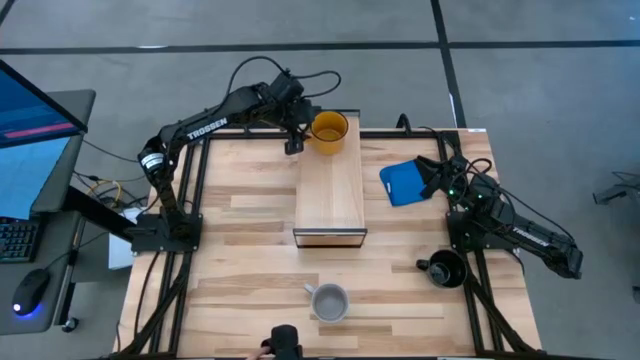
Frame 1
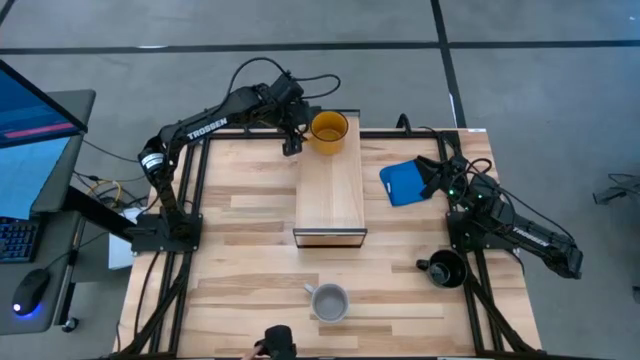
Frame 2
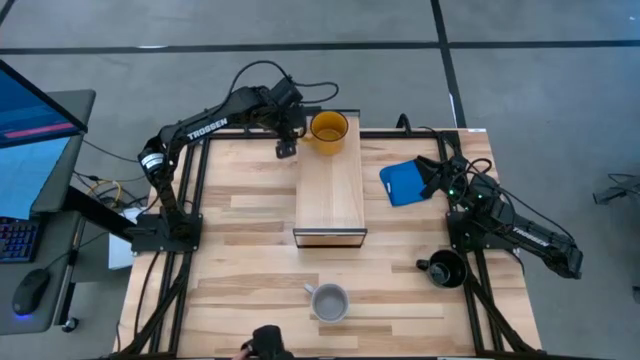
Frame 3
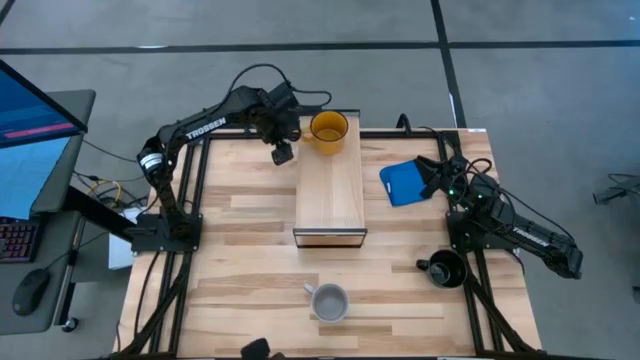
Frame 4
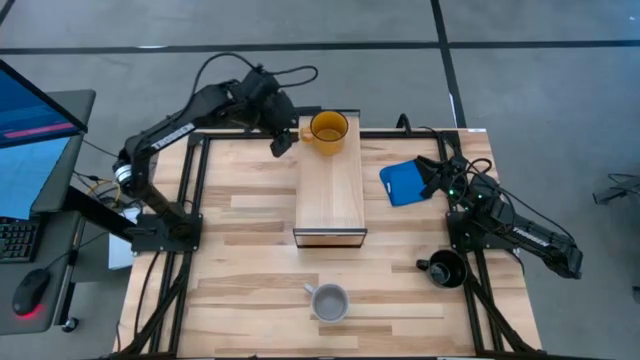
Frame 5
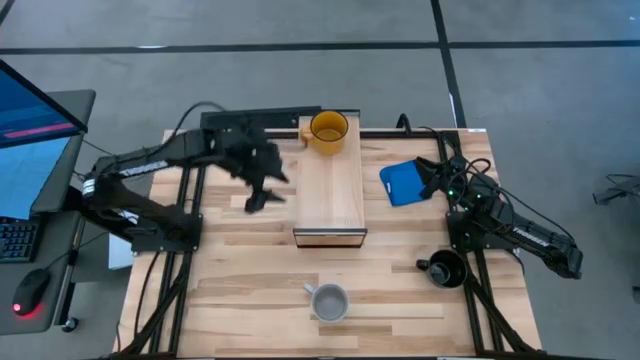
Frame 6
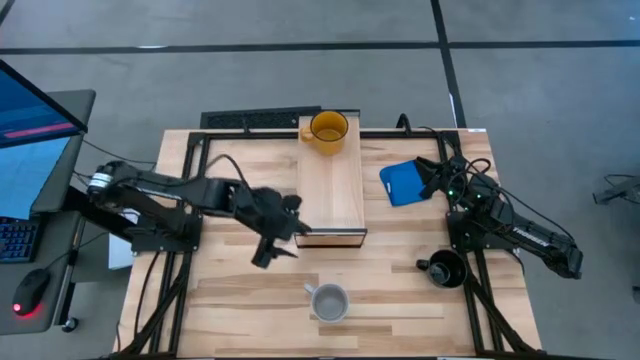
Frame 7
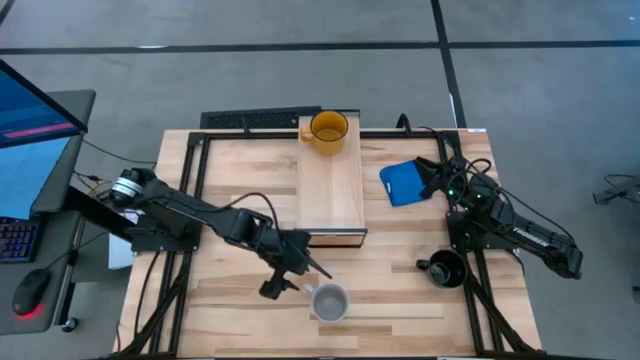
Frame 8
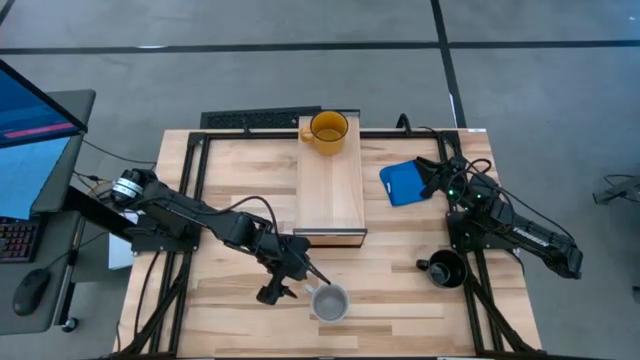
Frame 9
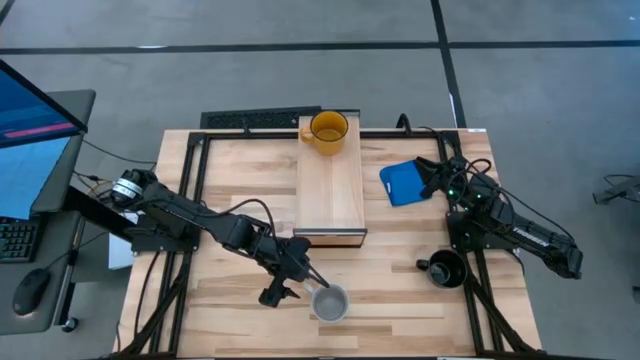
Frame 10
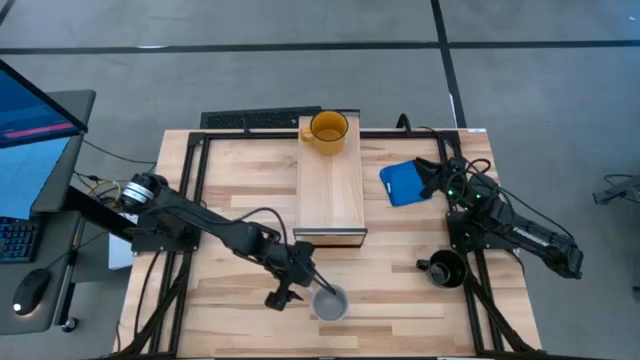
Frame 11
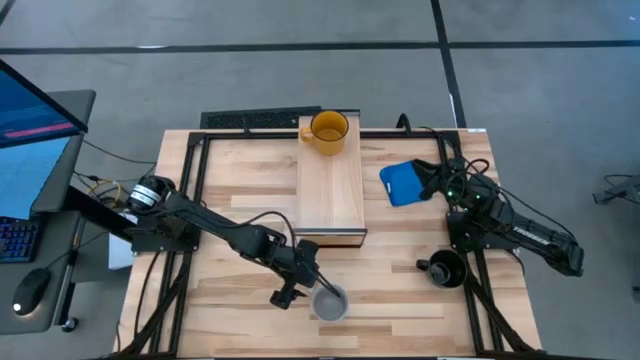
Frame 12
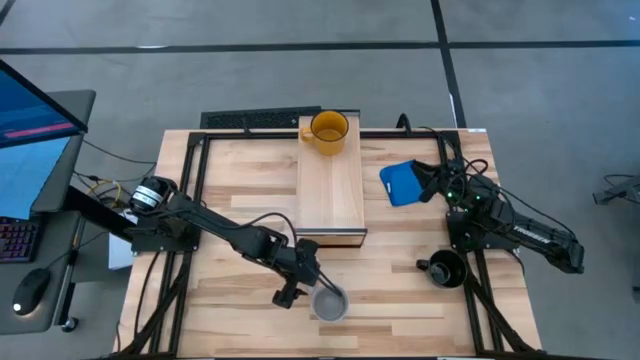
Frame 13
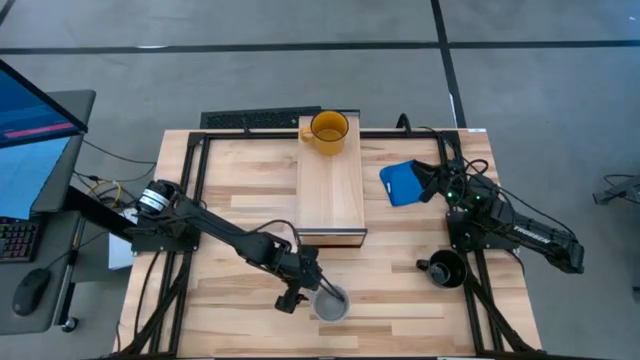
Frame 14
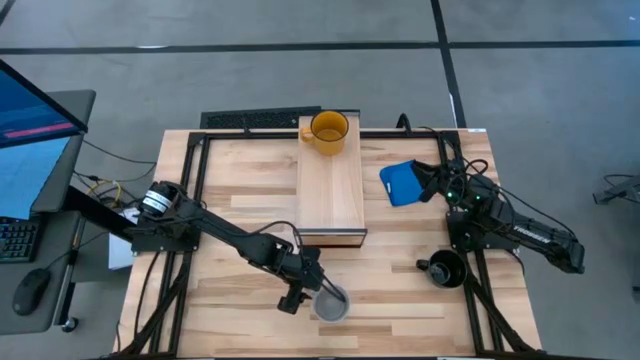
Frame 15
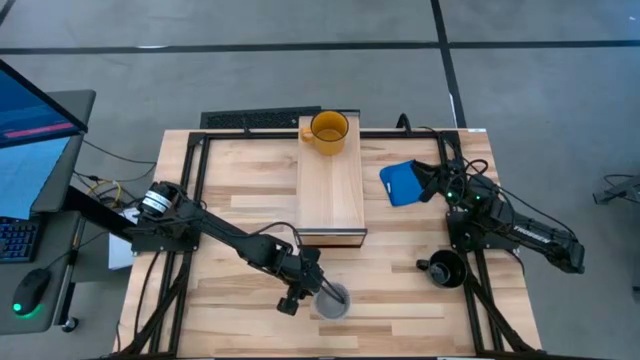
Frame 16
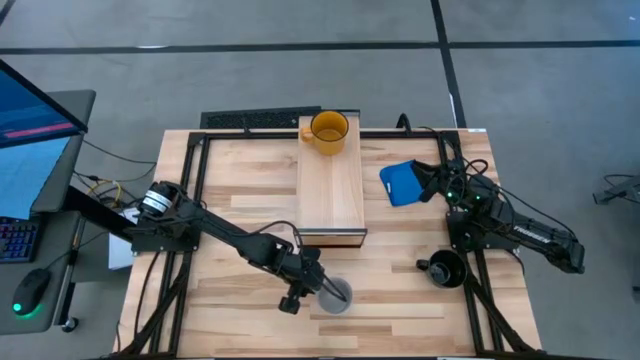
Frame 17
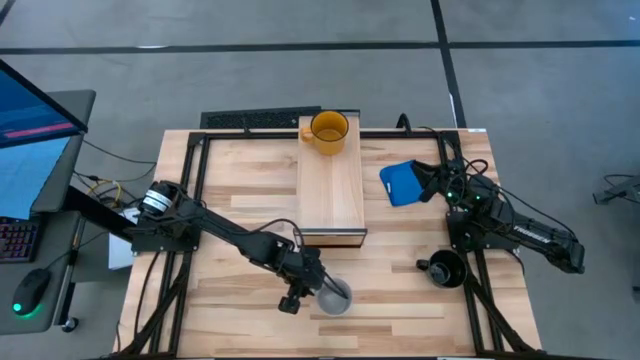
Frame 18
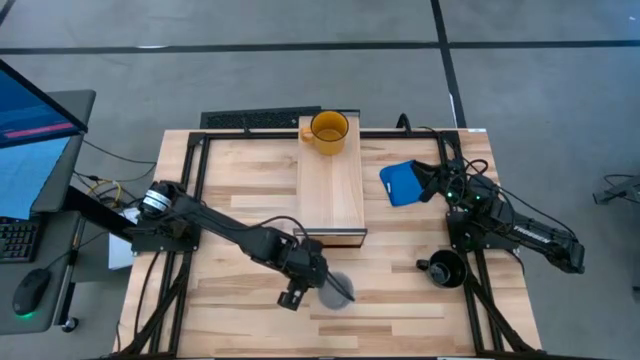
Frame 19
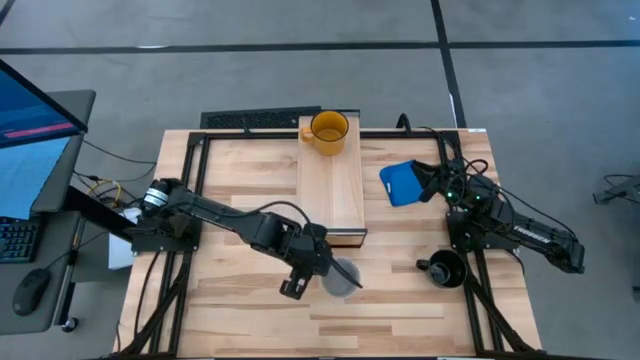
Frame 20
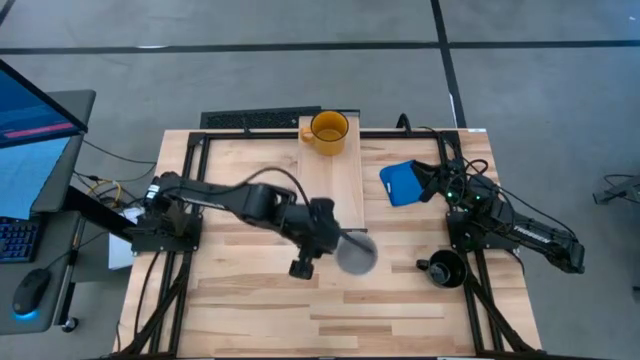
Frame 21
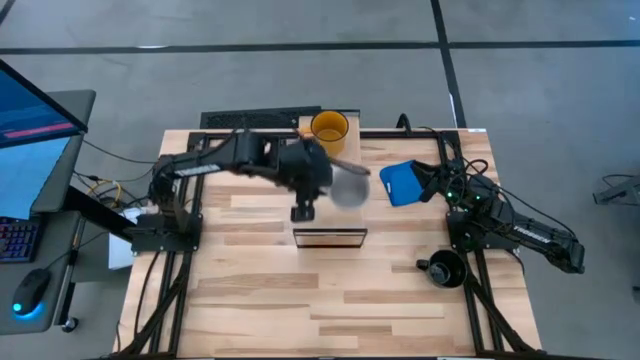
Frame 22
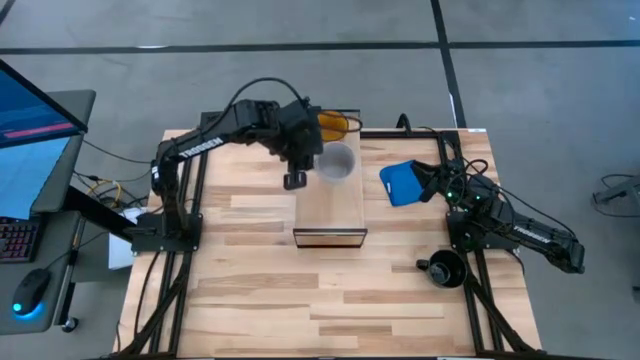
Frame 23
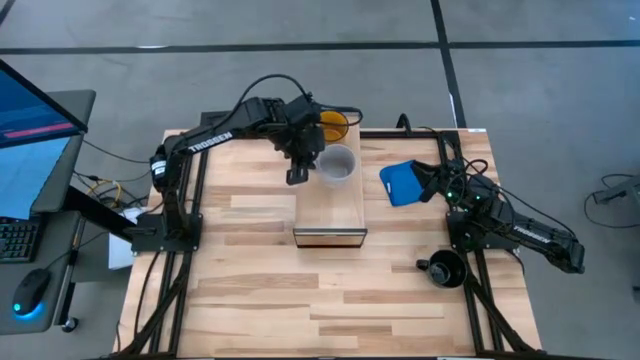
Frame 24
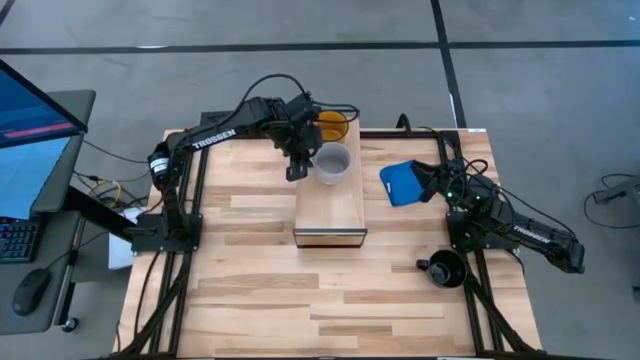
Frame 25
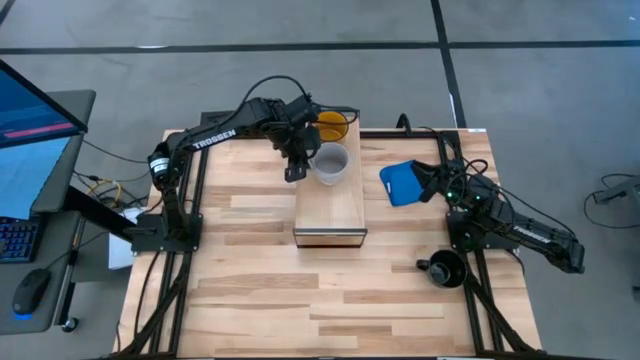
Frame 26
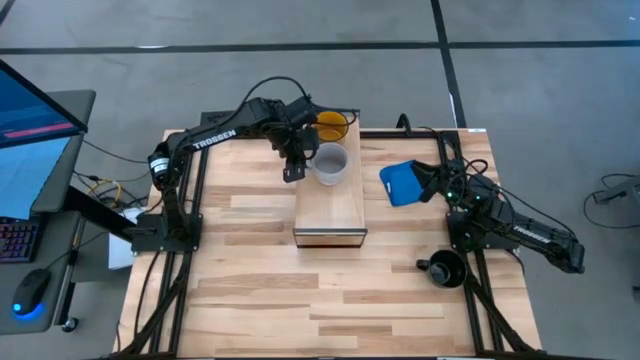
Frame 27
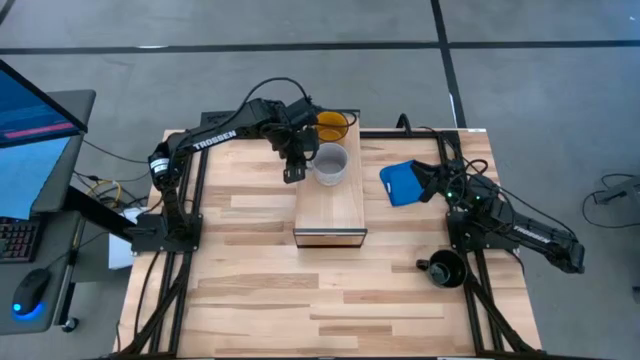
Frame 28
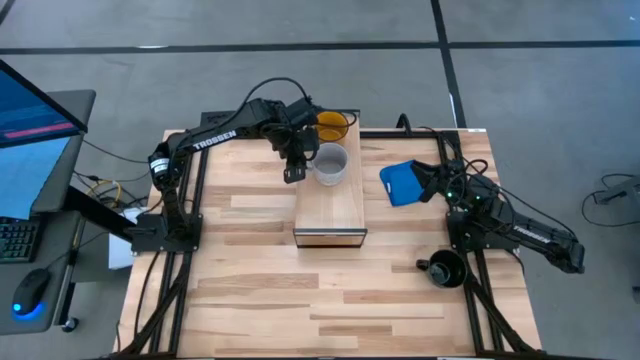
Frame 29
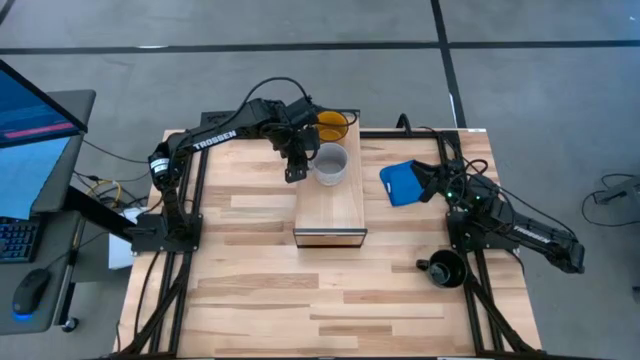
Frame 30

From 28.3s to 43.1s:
Task: Stack small to large cups/mugs on shelf
Put the gray mug on the shelf

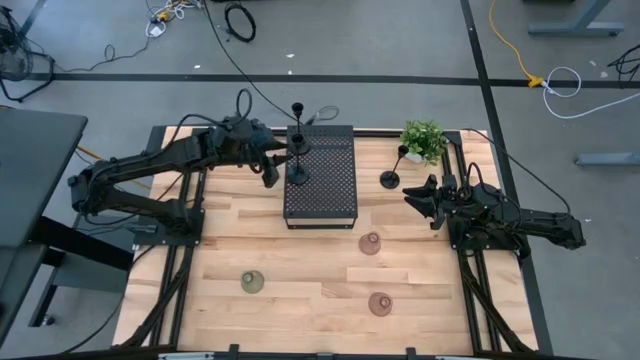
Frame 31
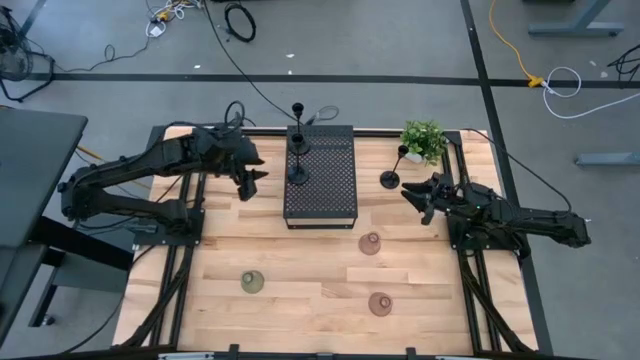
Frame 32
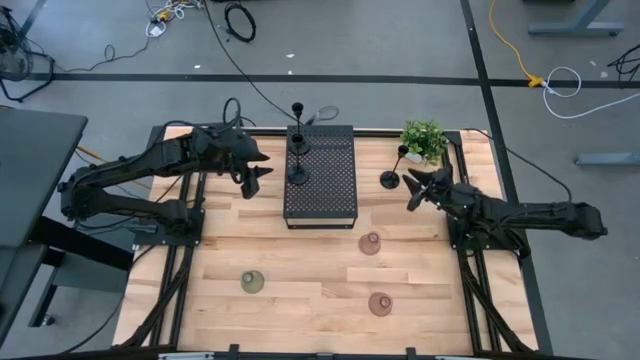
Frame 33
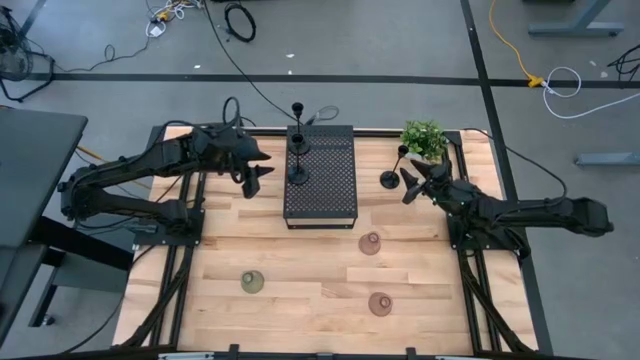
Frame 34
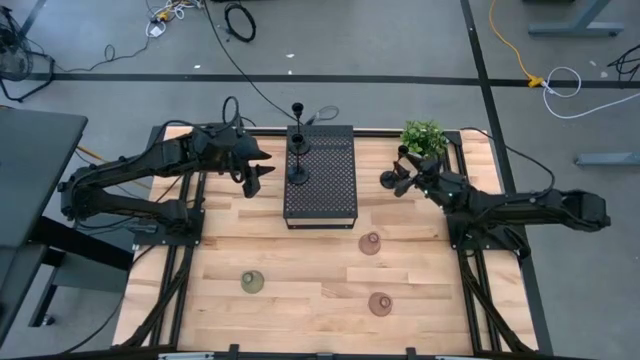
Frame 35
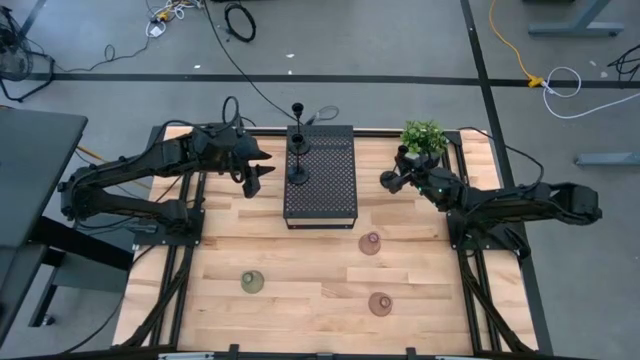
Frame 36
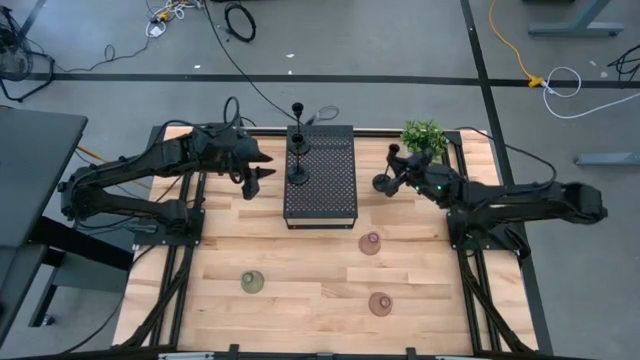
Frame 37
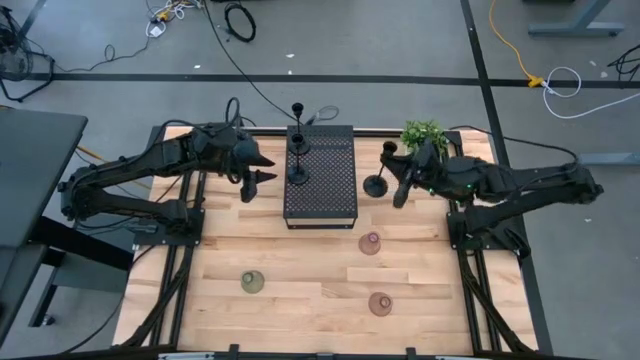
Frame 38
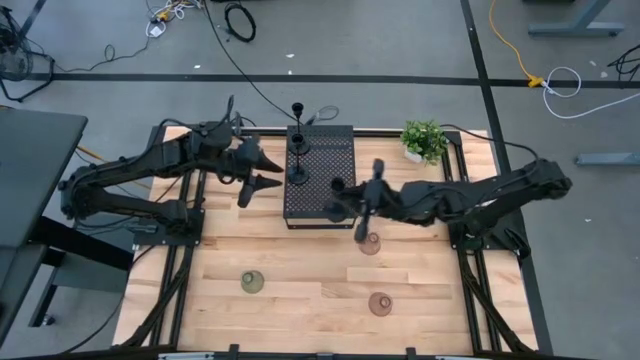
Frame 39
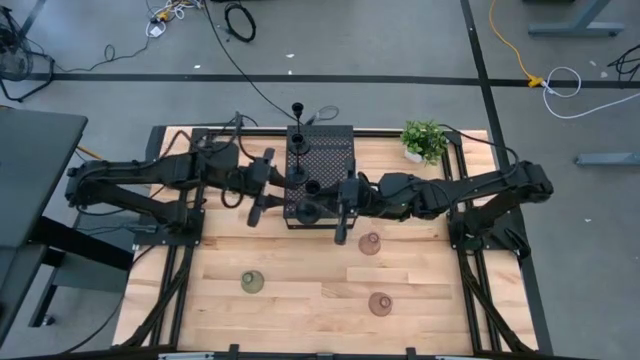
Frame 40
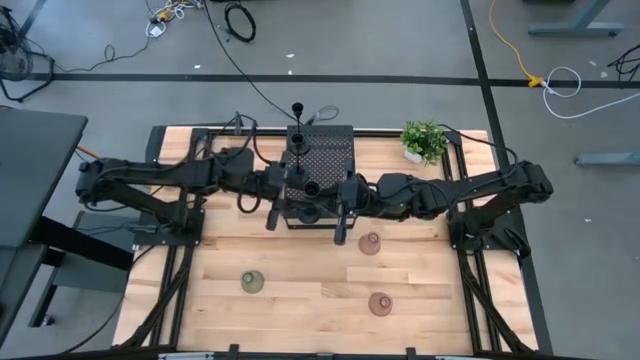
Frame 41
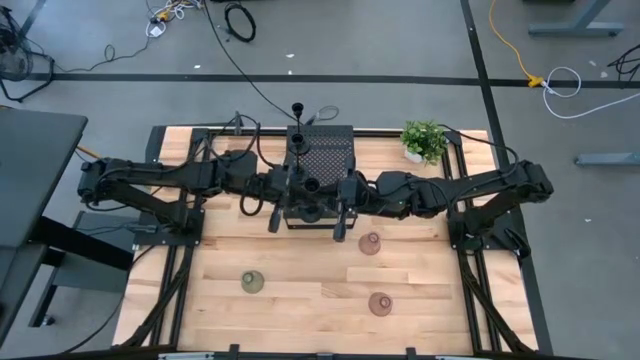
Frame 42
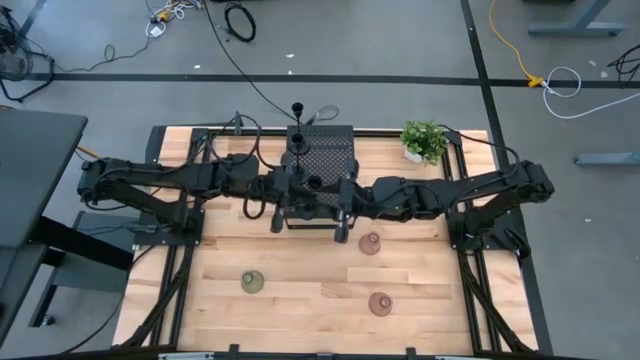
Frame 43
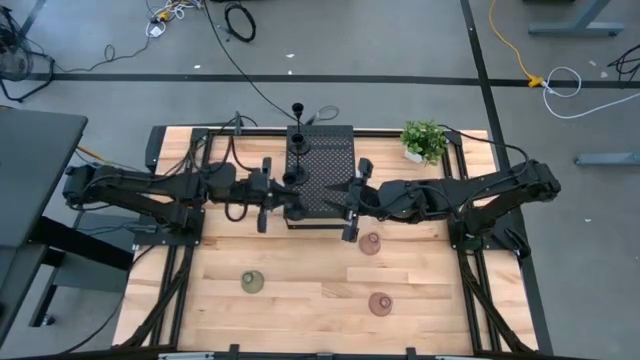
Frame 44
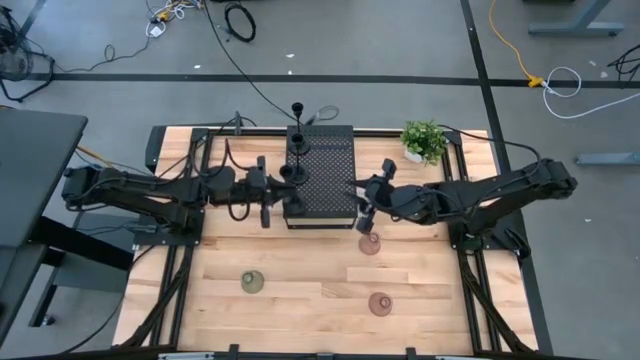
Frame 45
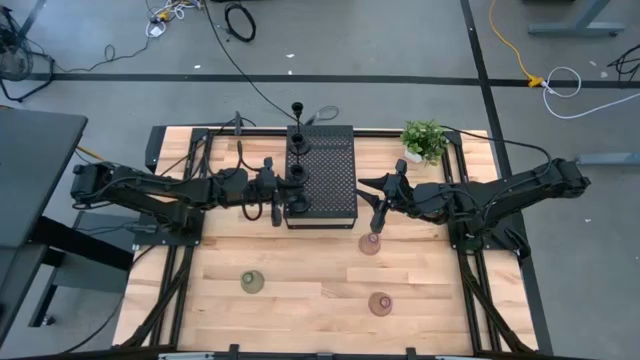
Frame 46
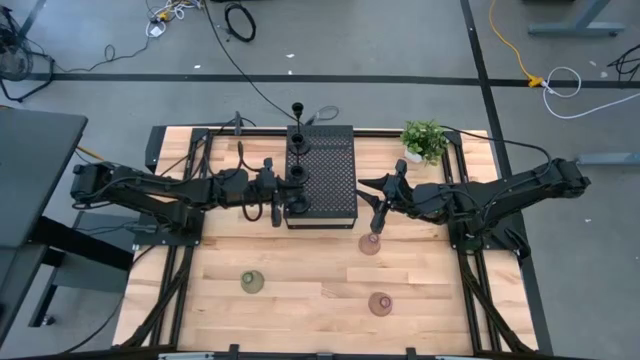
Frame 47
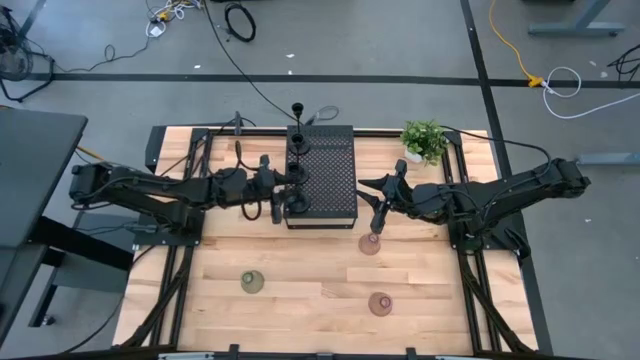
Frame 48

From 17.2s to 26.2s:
Task: Pick & Place candle stick holders
Put the black candle holder on the shelf
